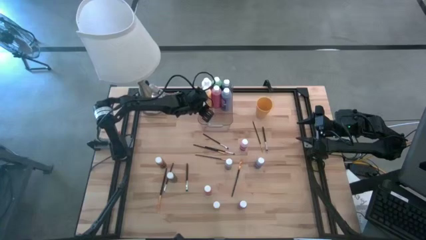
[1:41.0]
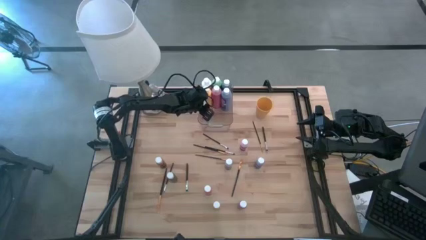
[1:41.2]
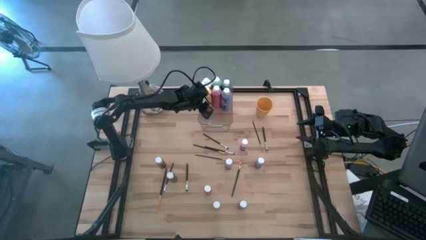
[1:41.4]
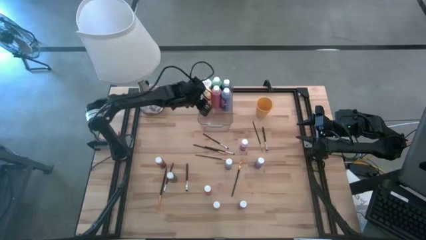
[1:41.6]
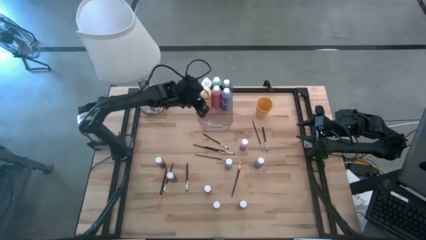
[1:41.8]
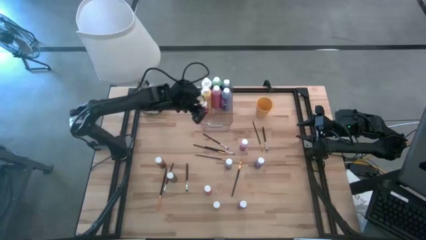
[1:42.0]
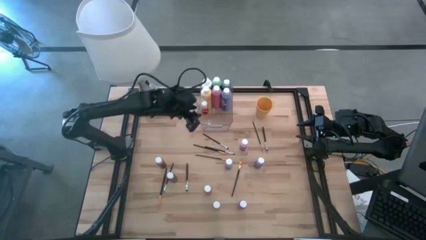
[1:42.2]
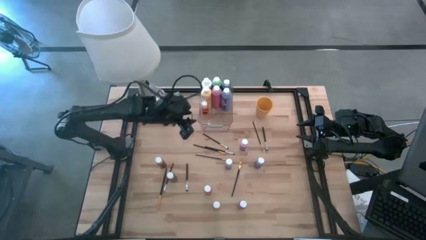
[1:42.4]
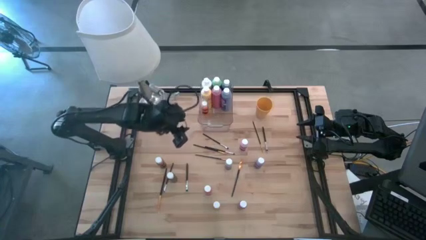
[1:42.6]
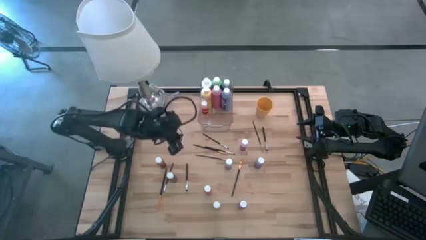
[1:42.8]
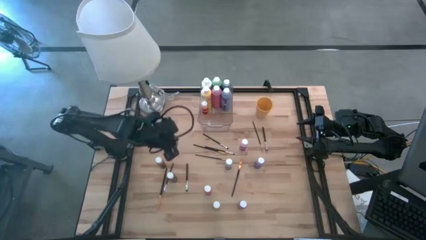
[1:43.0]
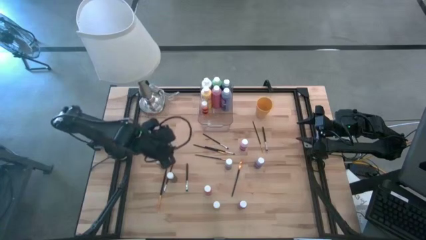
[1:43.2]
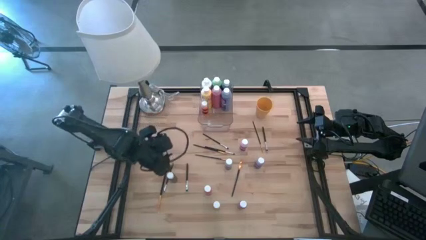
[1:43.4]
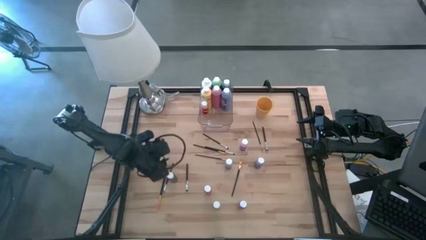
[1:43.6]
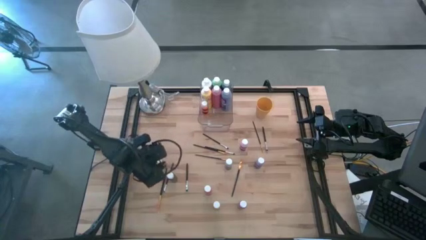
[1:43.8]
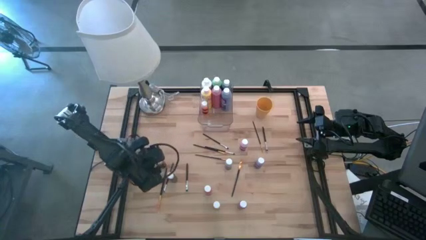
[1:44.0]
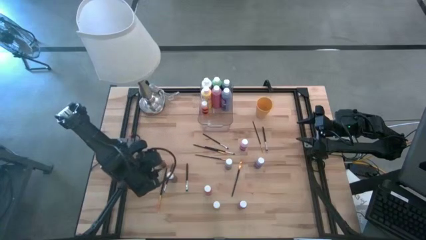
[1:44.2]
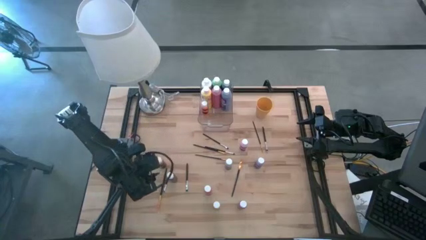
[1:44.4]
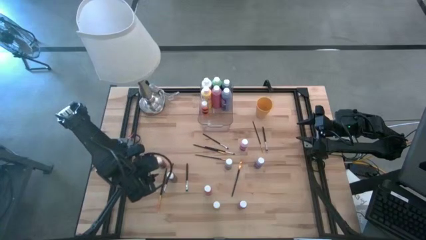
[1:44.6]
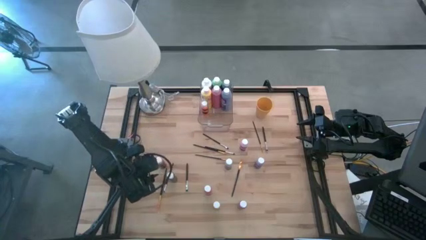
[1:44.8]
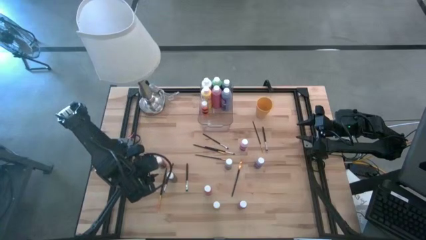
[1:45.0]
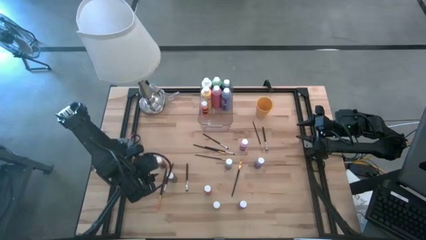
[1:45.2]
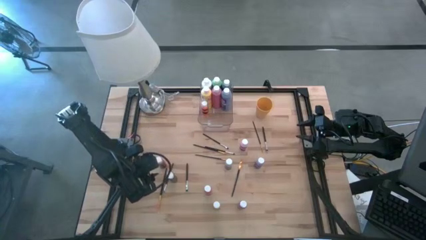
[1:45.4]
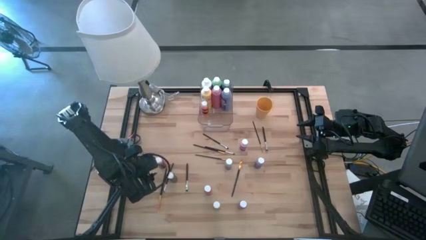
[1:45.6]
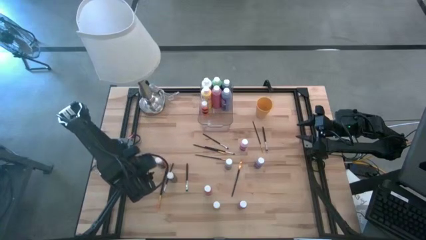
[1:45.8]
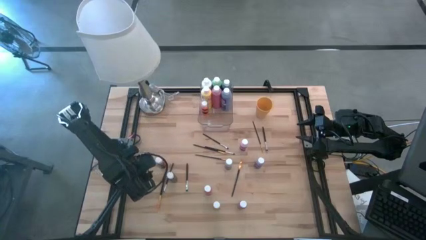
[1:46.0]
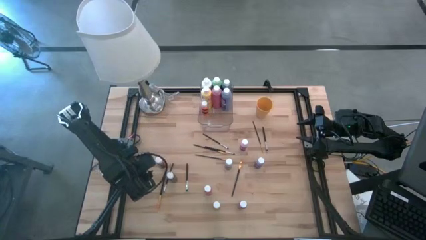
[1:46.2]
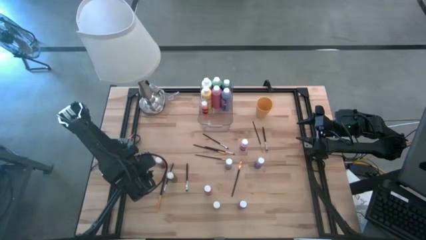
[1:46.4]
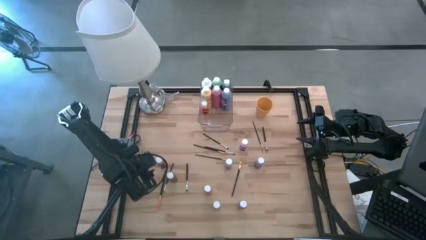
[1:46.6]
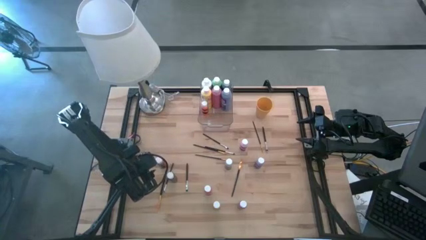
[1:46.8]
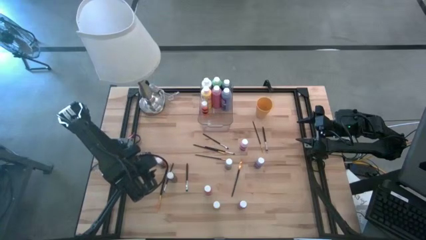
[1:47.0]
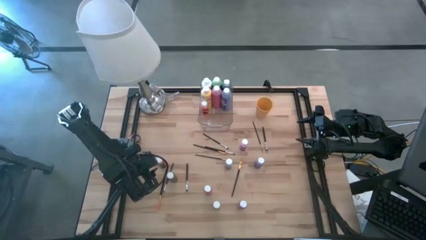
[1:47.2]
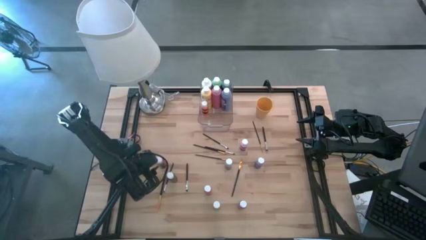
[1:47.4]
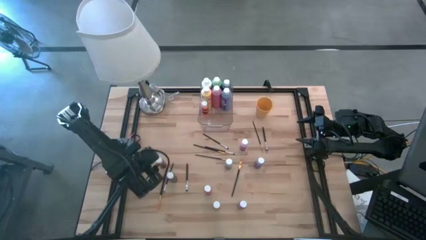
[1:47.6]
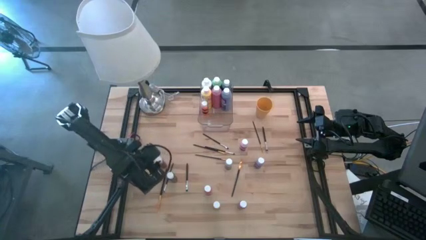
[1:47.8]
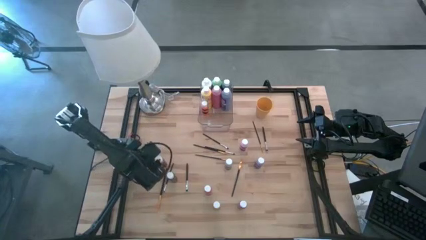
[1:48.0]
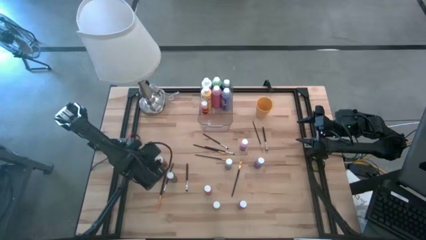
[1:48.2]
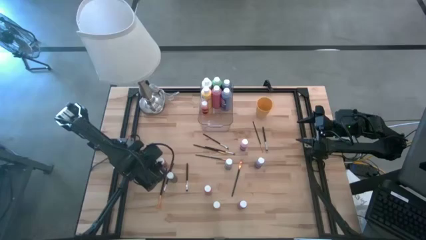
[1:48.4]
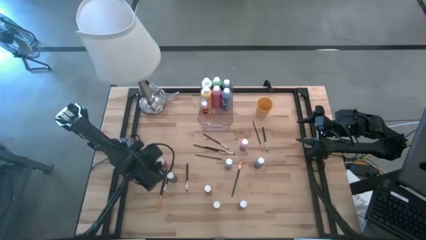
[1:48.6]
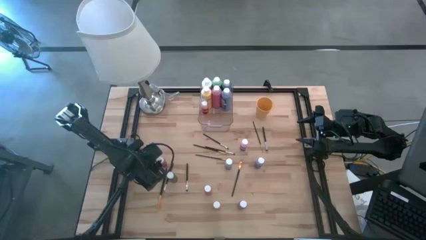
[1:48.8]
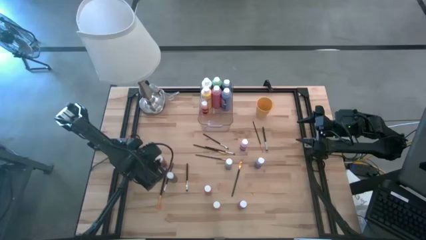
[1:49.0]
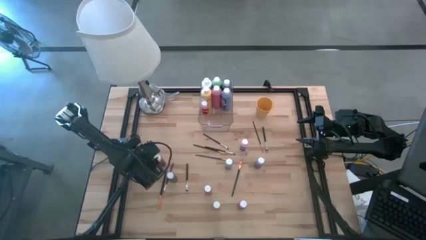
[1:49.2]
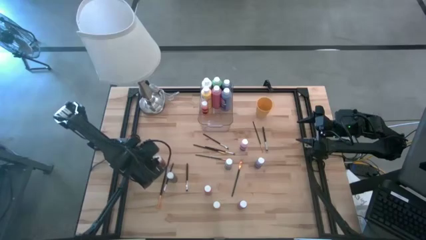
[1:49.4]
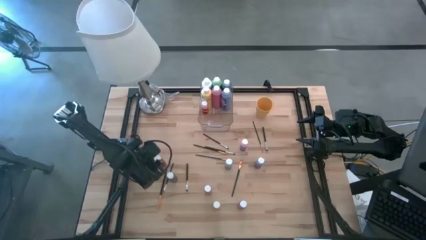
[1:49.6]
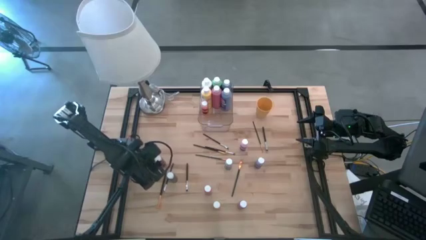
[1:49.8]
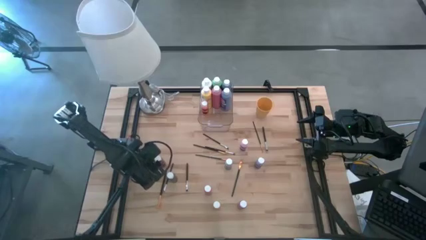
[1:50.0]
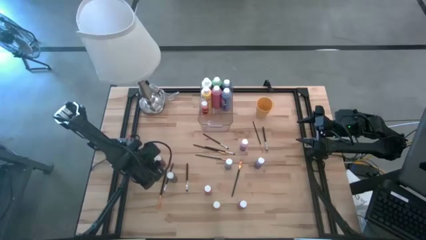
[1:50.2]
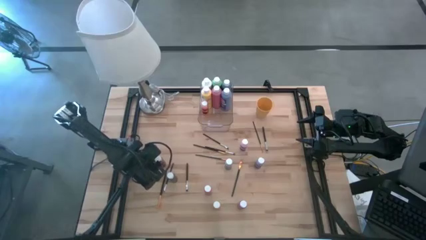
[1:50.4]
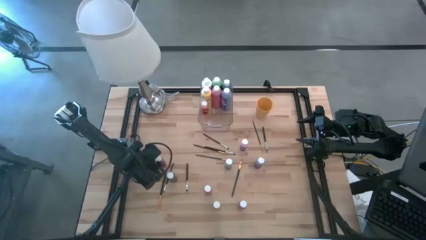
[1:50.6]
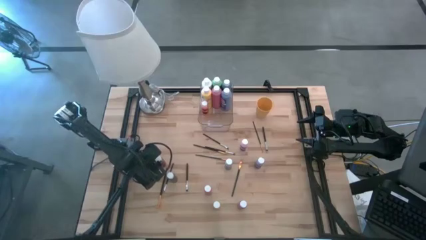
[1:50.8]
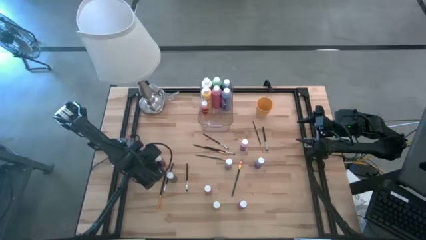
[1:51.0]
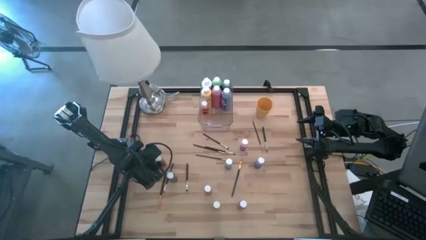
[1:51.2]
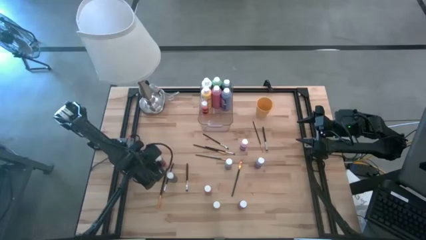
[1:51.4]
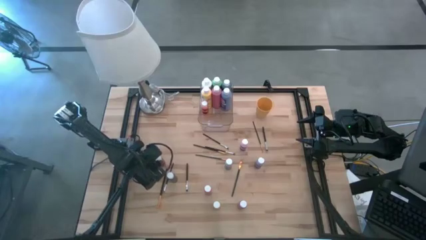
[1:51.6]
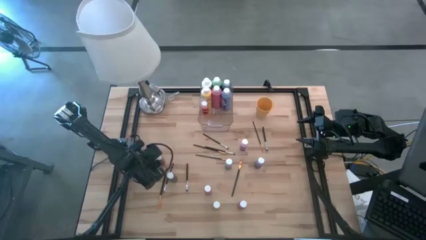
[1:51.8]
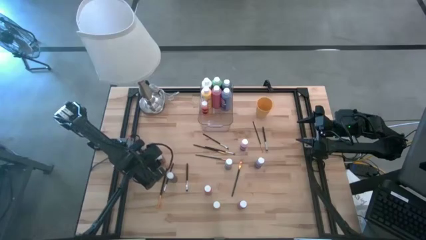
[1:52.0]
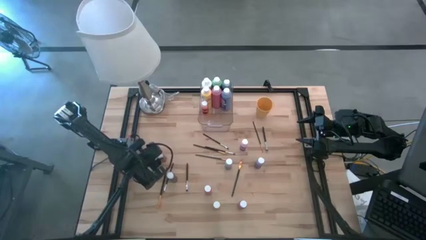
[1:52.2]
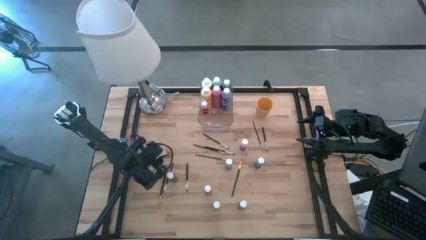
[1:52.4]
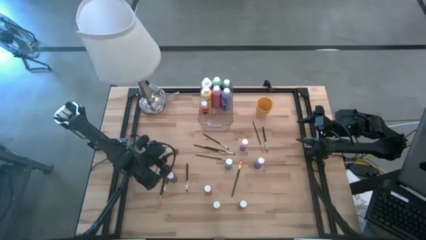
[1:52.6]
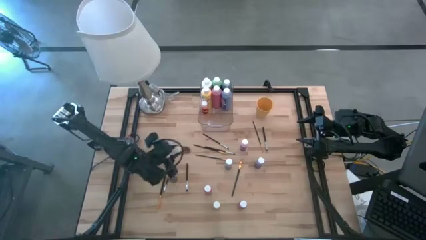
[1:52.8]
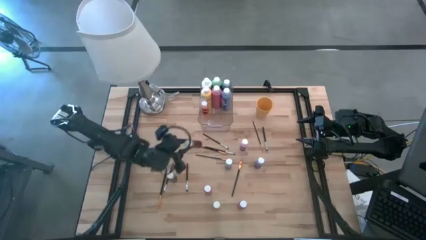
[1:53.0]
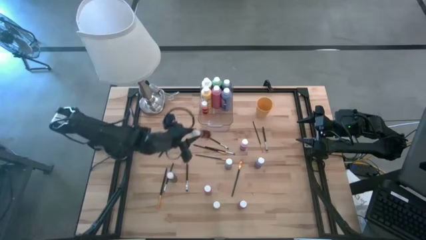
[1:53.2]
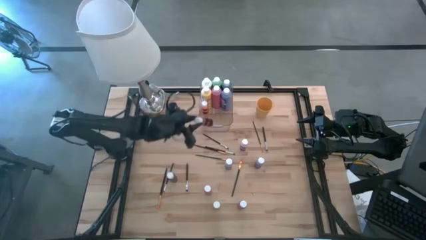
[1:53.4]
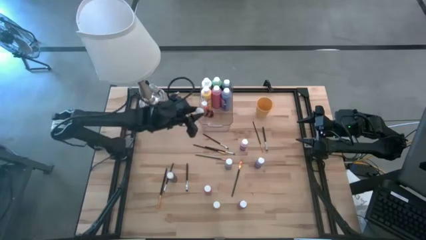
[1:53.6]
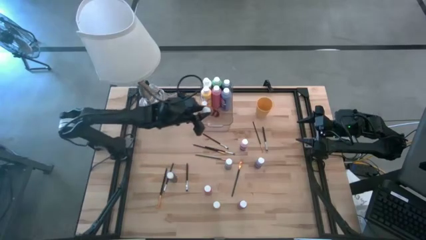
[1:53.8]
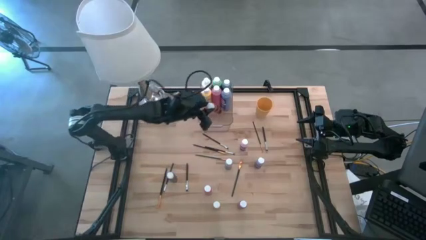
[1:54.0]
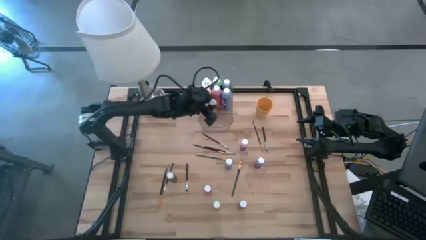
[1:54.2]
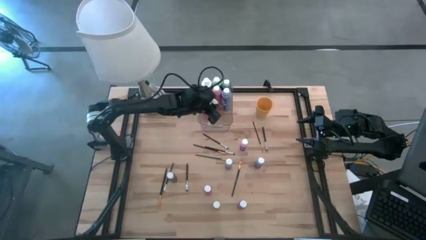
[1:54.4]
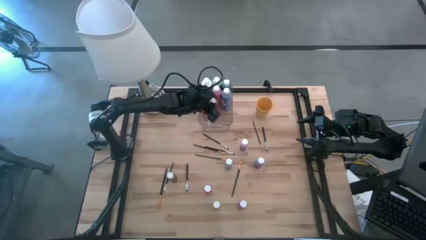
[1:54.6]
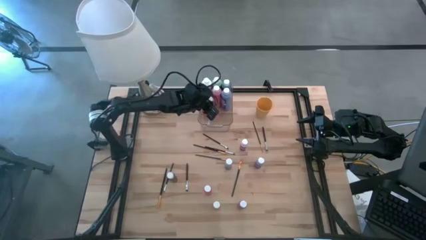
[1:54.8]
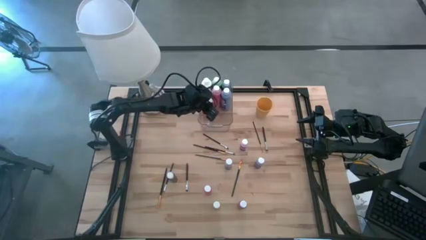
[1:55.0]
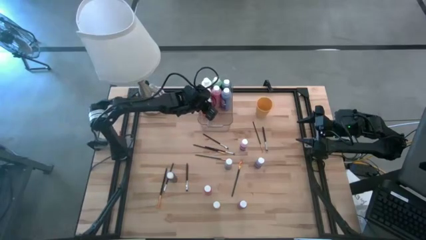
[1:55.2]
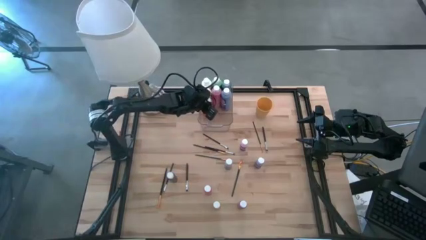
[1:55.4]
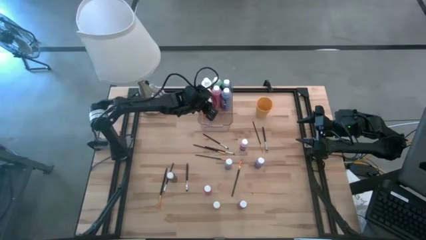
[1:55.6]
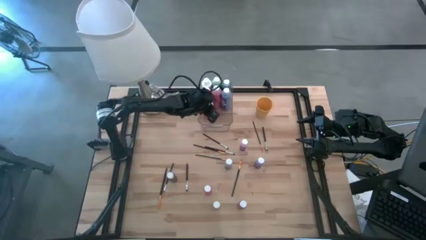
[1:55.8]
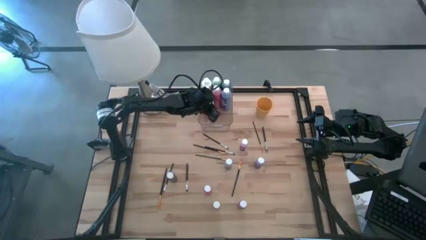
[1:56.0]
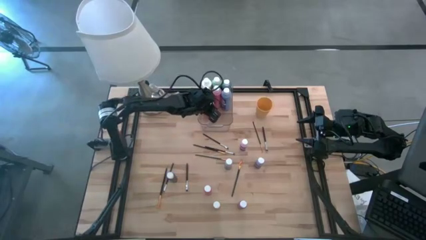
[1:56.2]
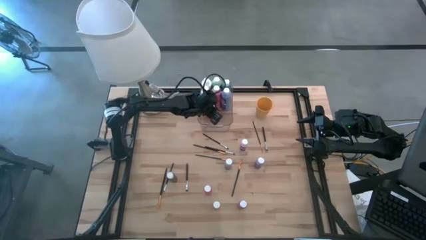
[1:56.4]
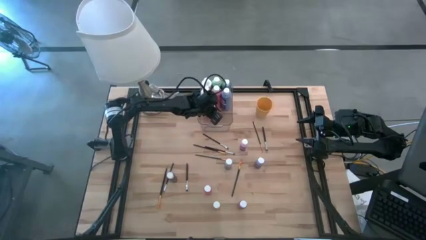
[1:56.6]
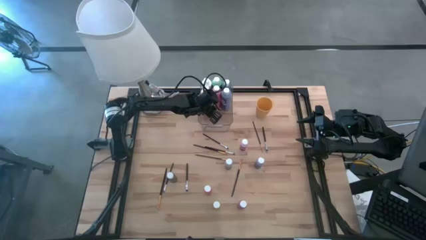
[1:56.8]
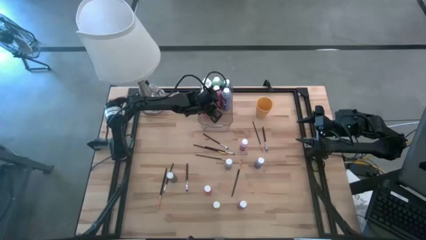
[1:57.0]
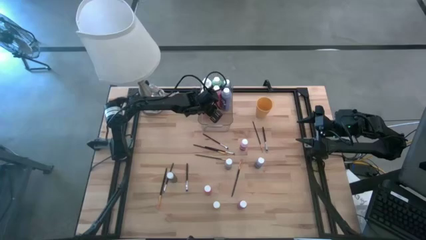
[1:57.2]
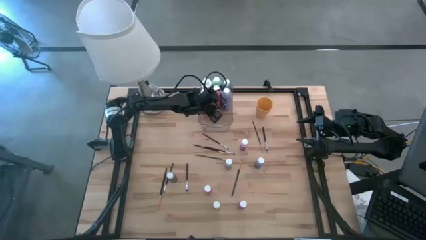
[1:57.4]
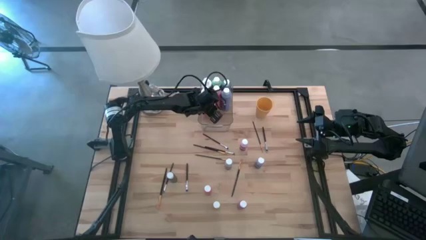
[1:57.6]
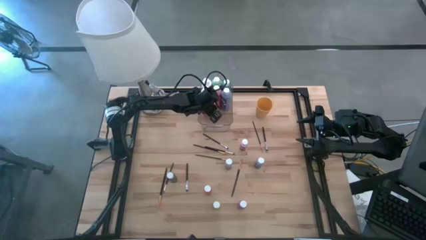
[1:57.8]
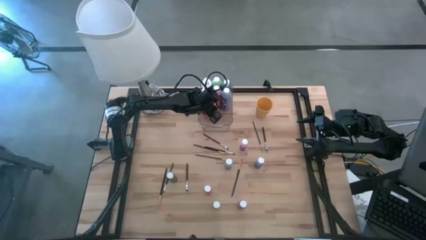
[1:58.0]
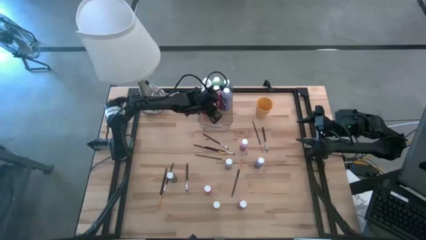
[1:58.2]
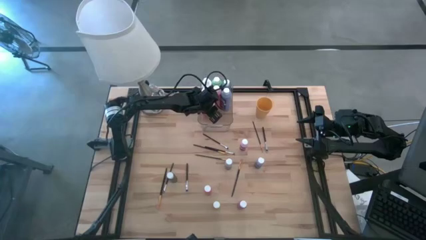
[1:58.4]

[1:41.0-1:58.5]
Task: Pick & Place Paint Supplies
Put the small brown paint bottle into the bin
